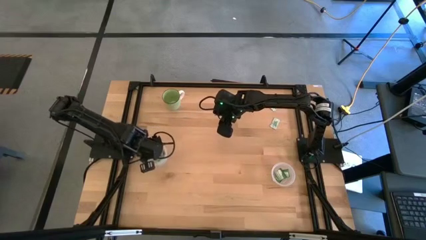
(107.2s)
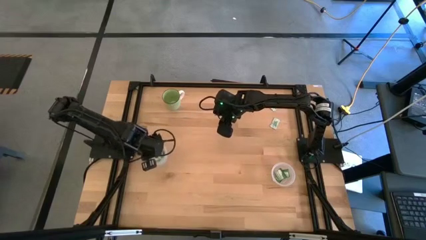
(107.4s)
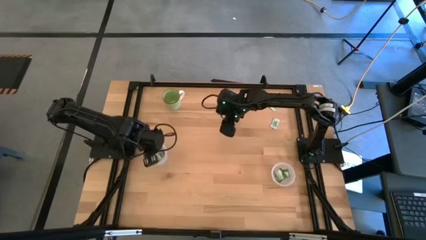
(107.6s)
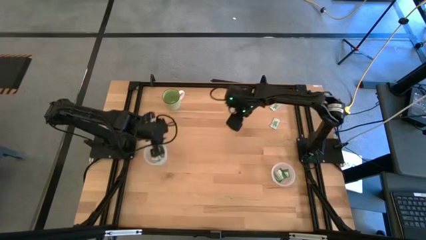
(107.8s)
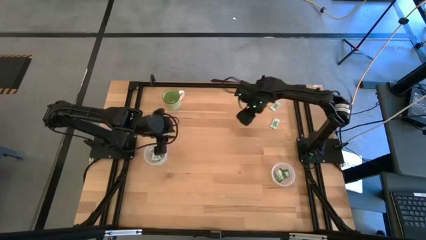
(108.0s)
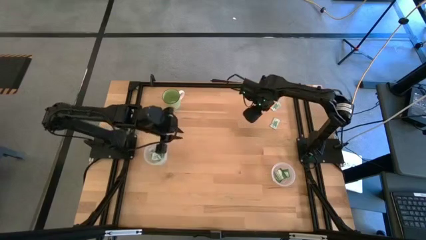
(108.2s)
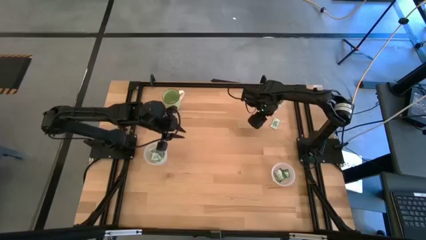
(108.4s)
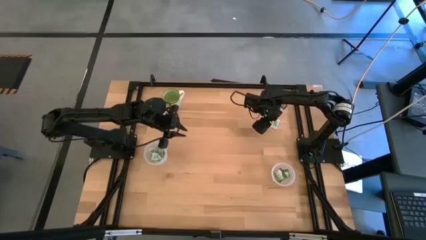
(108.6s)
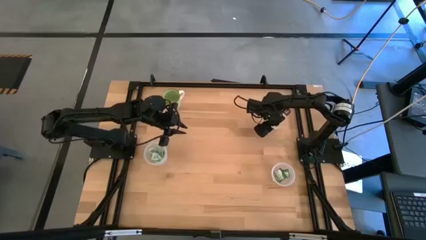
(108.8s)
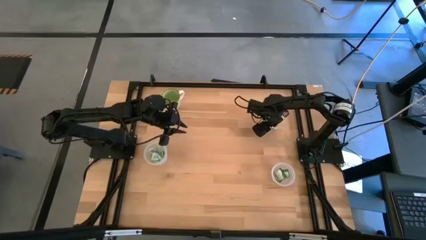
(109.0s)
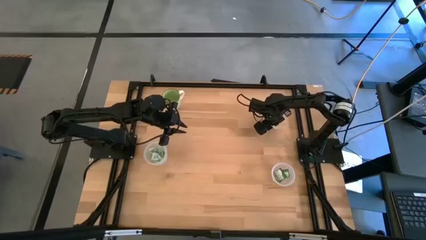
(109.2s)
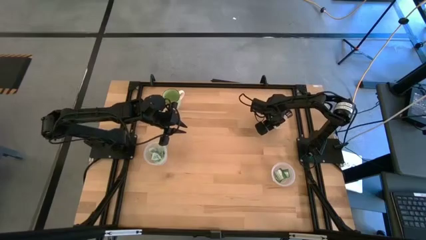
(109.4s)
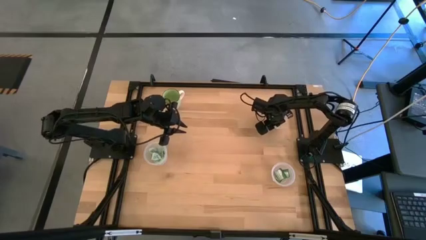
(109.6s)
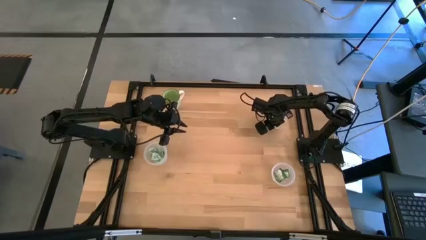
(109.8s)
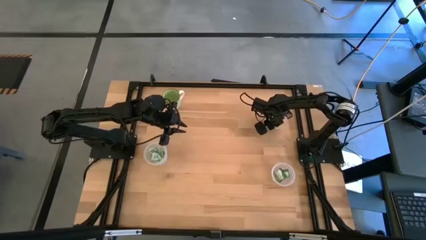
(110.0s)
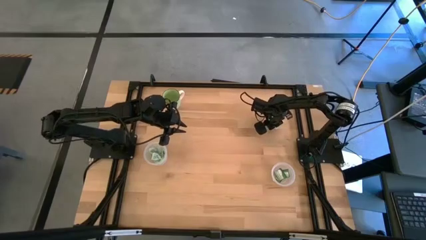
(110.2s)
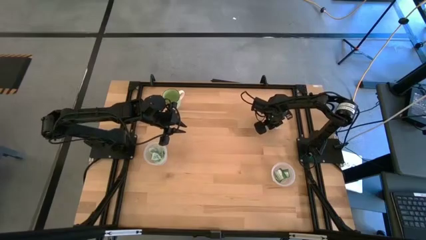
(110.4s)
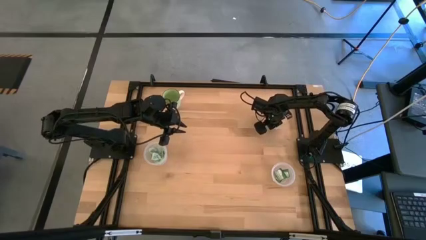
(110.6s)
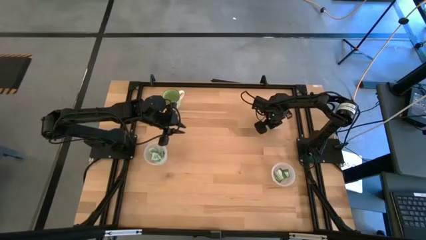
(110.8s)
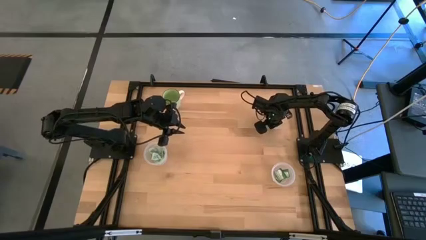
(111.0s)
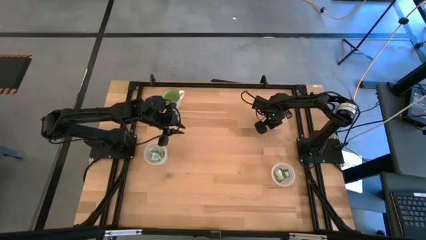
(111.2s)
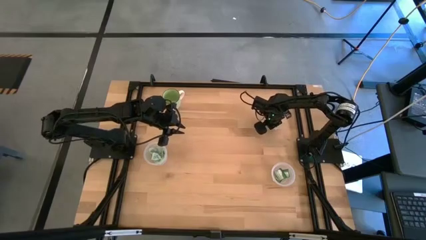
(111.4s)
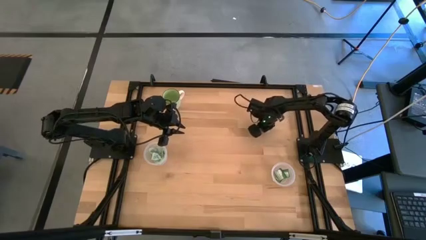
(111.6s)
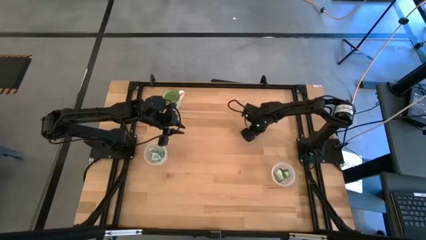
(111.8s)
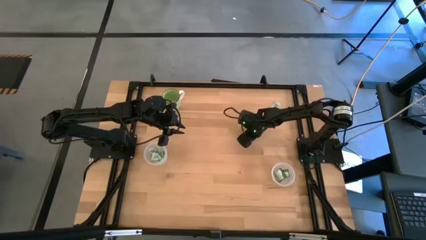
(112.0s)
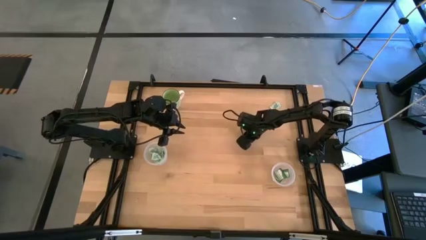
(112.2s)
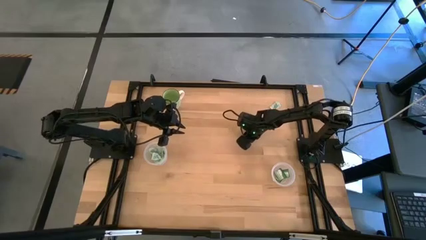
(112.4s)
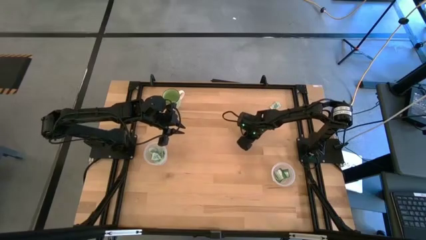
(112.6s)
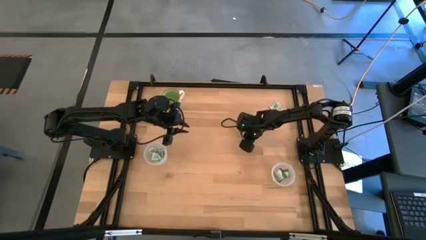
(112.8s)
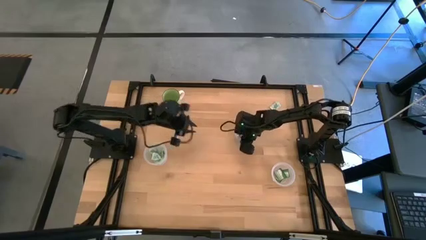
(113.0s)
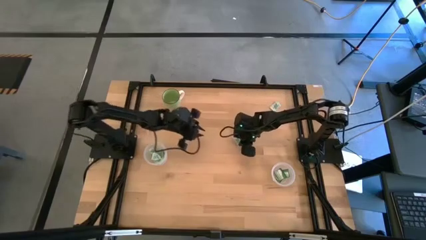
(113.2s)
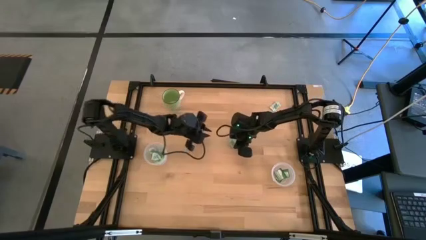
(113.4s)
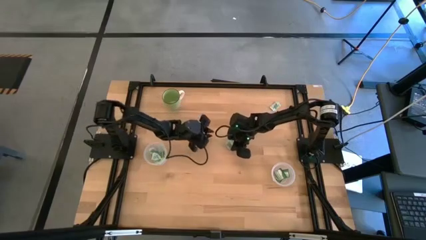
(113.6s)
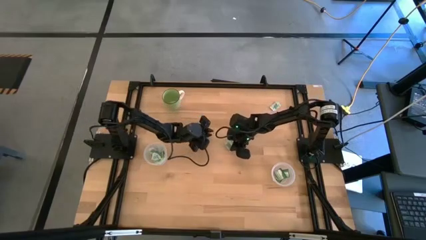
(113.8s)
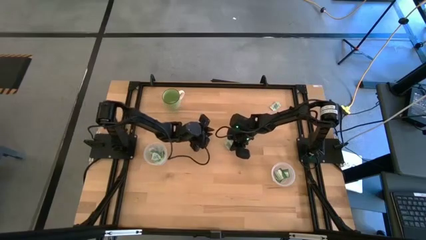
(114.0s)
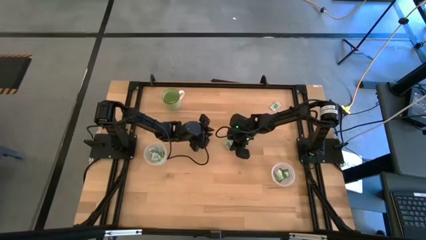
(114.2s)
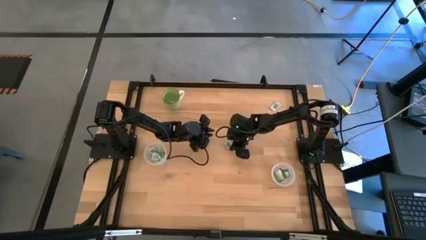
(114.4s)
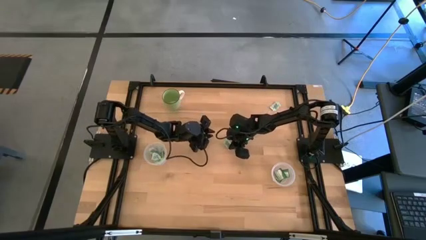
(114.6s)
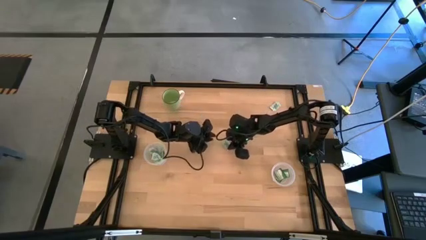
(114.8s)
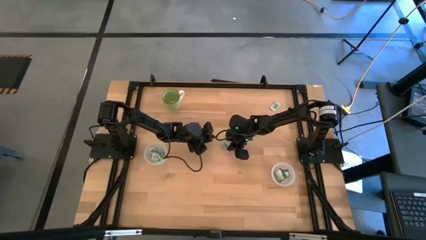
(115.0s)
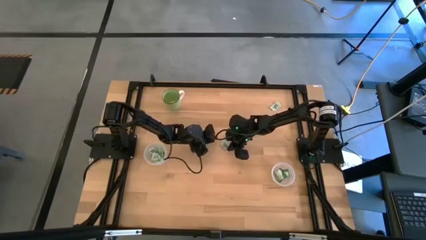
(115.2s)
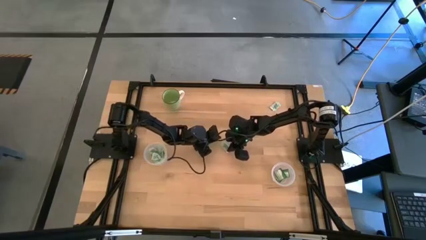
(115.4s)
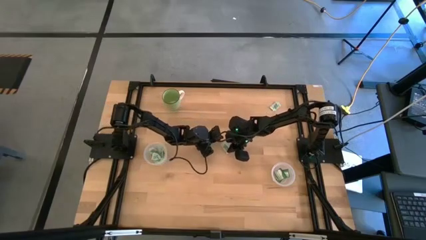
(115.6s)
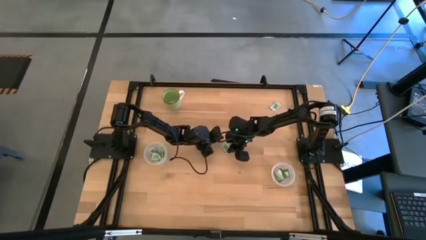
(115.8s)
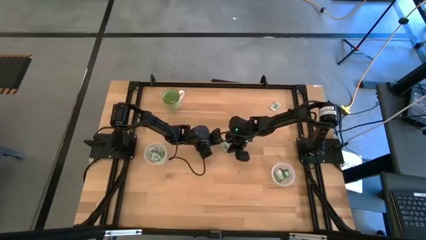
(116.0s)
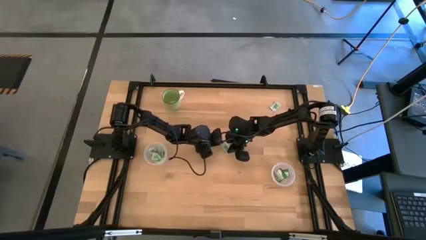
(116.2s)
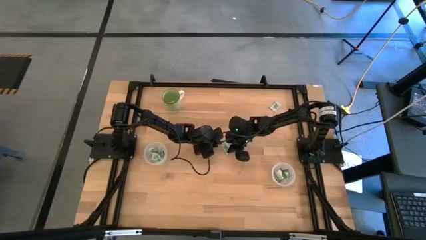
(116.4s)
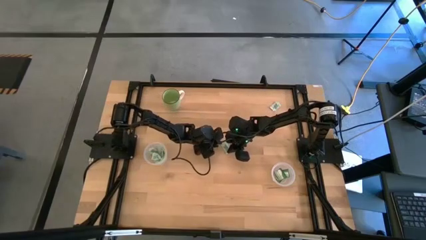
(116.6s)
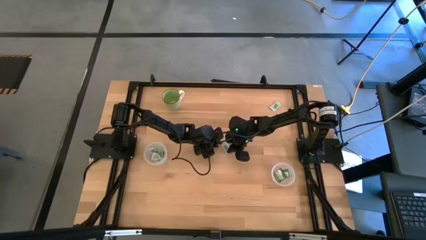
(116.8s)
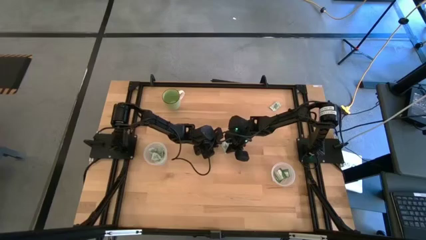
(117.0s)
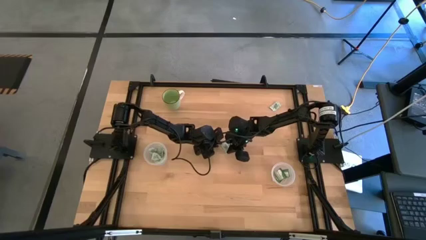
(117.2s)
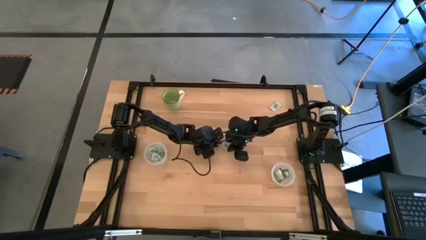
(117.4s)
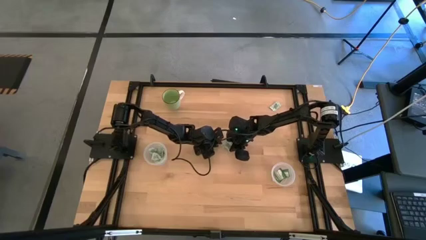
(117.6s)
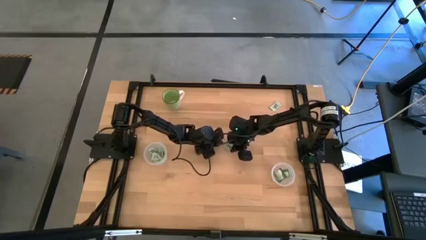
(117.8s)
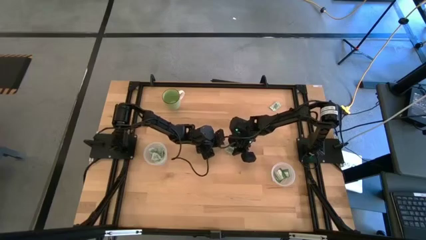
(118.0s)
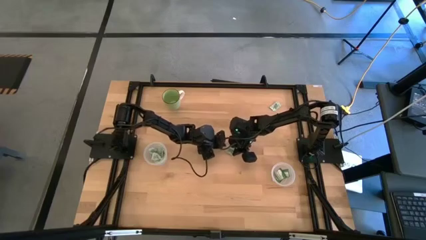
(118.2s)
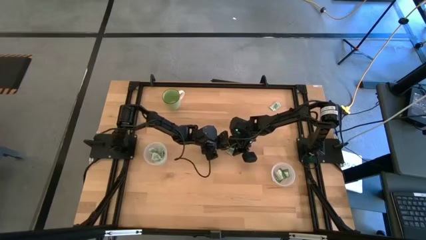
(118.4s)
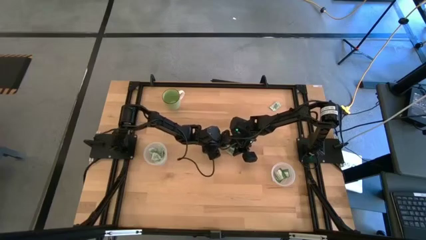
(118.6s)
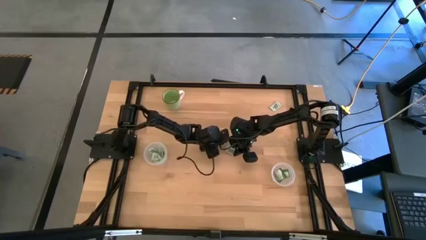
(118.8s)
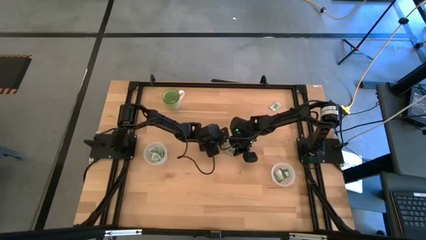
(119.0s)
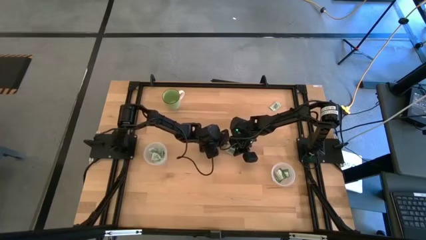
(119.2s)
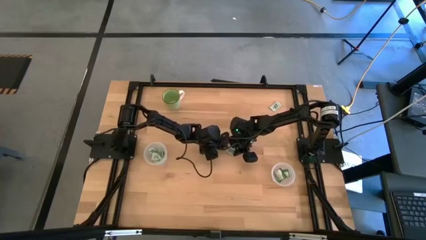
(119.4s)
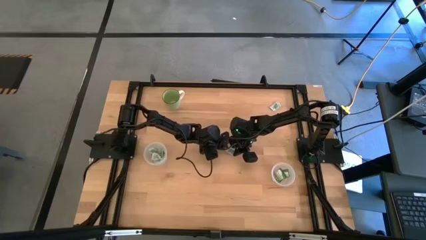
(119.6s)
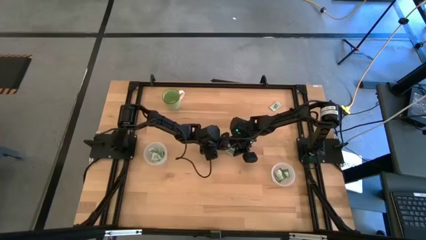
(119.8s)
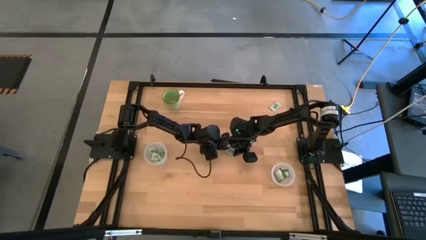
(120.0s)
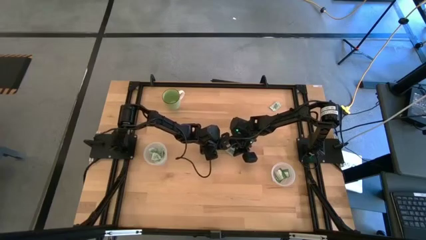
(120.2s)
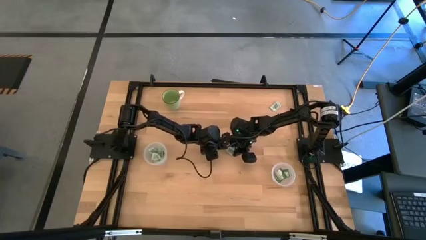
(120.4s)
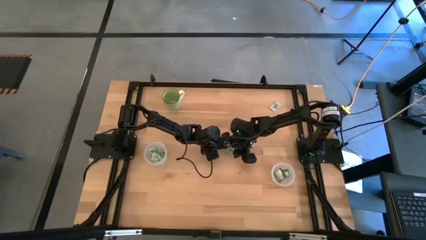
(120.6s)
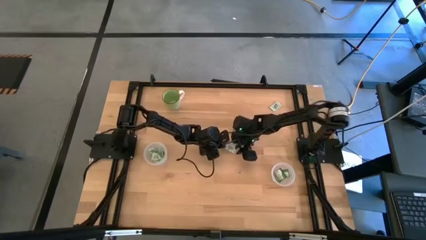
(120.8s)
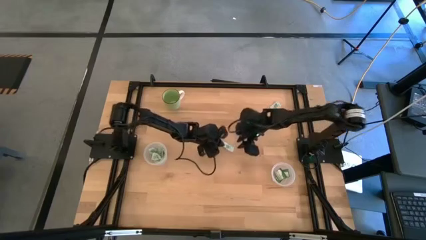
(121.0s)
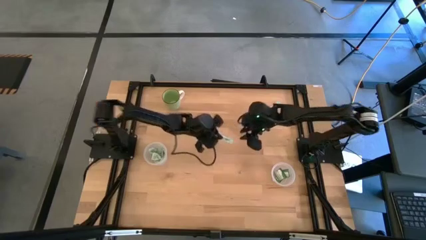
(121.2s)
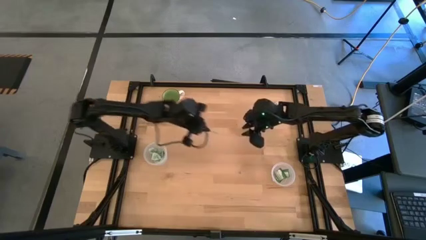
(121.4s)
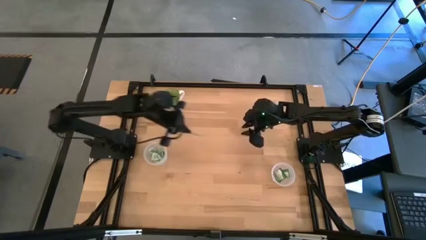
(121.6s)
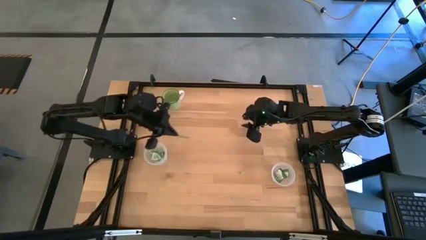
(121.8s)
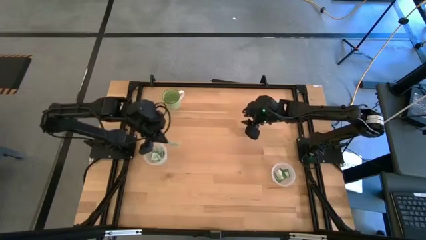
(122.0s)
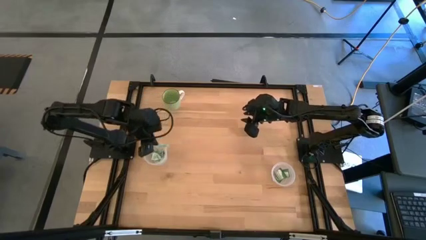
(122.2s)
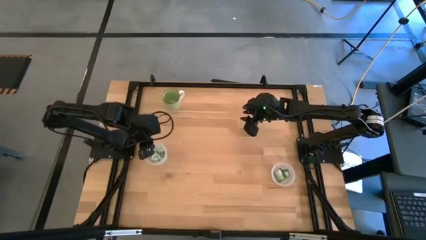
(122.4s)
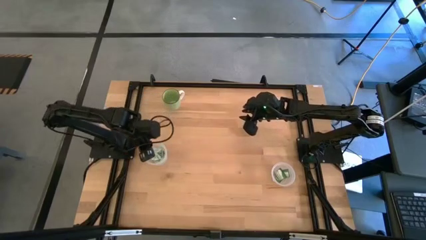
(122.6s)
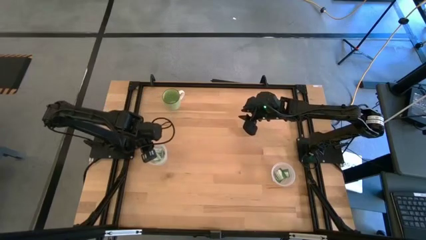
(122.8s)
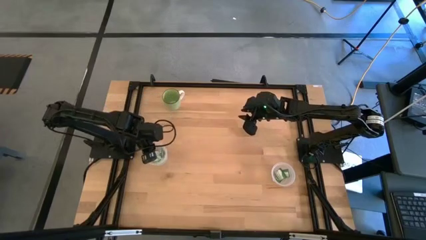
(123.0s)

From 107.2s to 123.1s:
Task: Pick and place items into bin
Put the stevia packet into the left transparent bin
